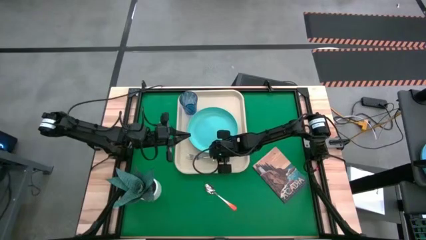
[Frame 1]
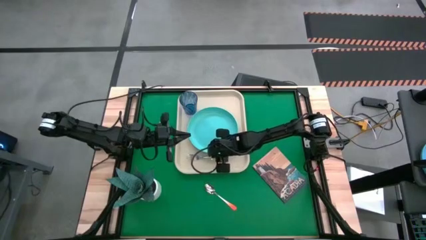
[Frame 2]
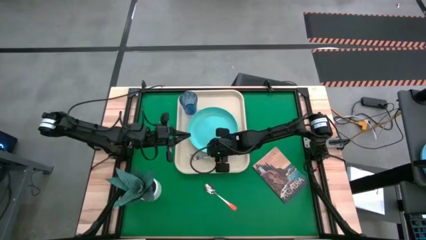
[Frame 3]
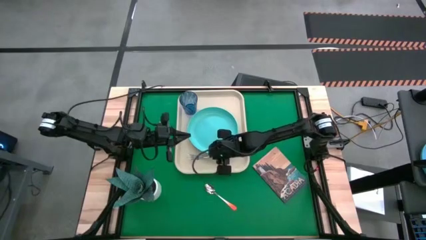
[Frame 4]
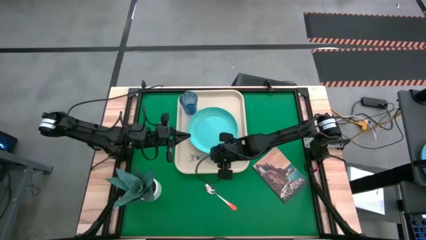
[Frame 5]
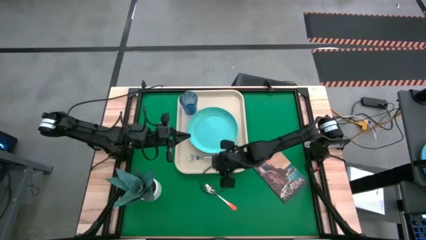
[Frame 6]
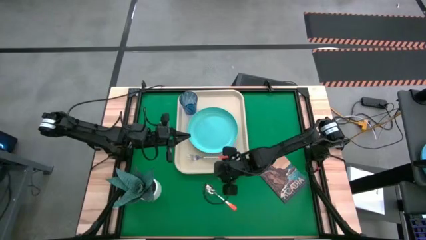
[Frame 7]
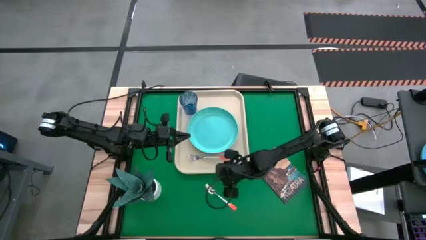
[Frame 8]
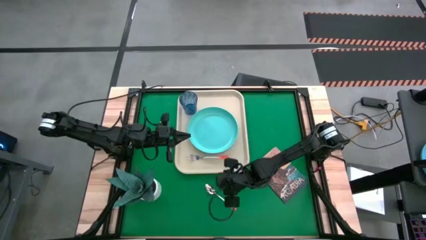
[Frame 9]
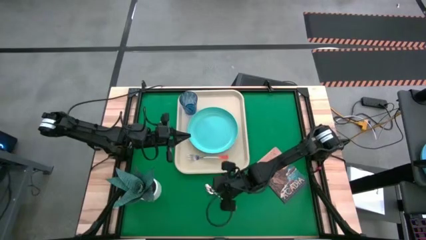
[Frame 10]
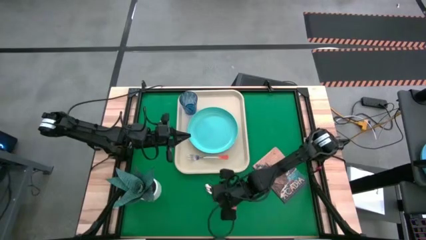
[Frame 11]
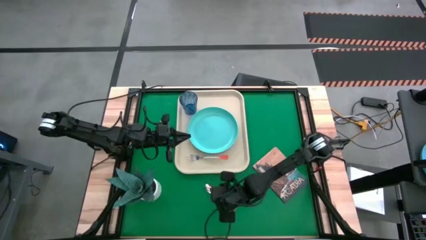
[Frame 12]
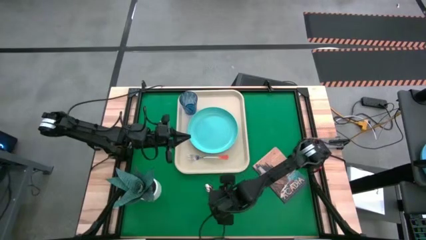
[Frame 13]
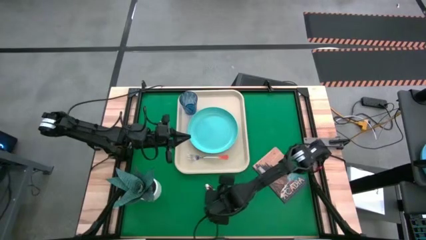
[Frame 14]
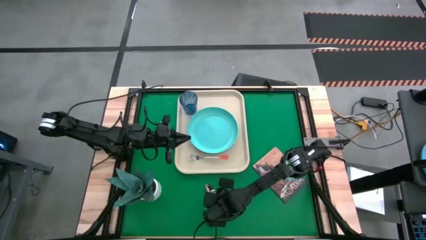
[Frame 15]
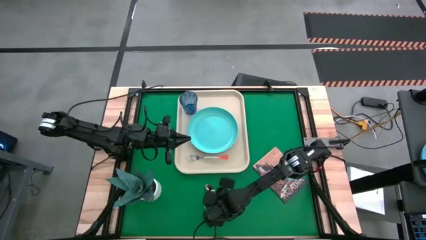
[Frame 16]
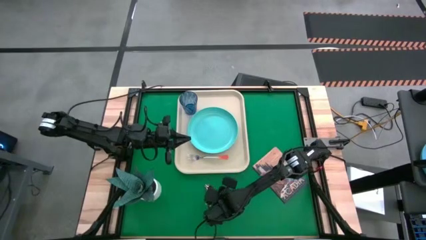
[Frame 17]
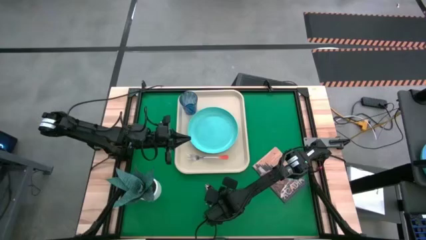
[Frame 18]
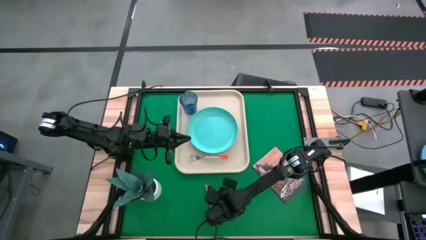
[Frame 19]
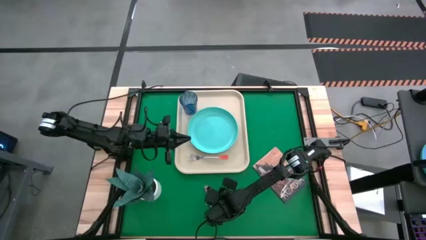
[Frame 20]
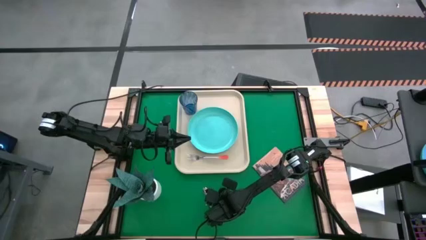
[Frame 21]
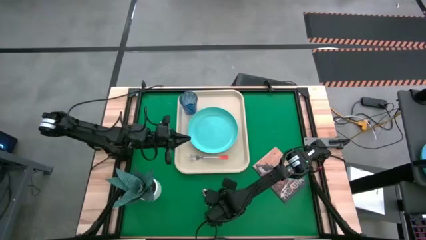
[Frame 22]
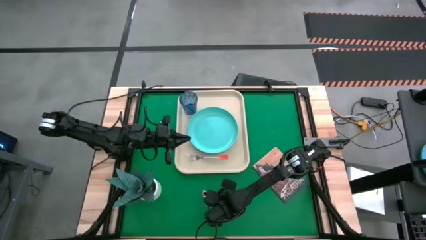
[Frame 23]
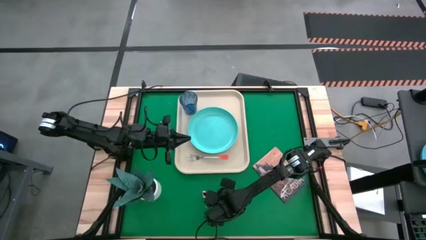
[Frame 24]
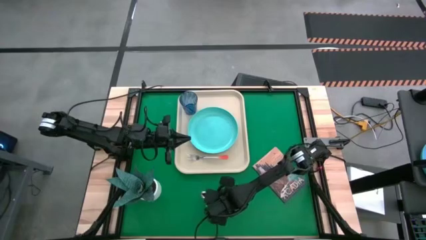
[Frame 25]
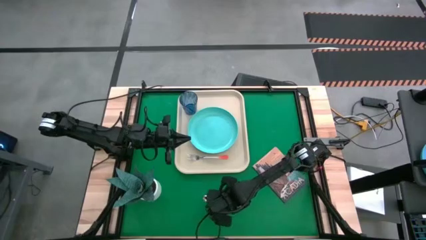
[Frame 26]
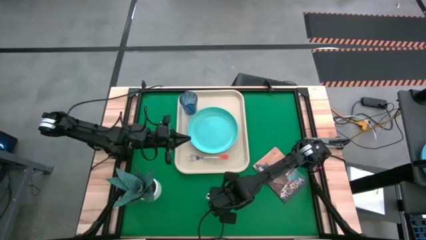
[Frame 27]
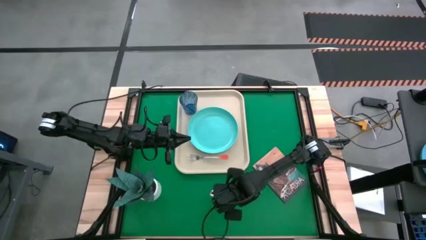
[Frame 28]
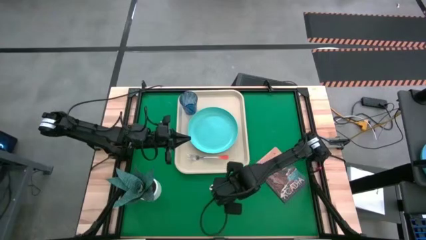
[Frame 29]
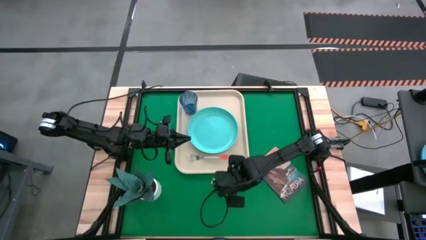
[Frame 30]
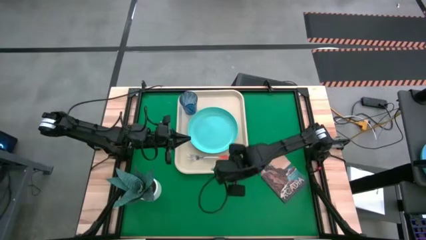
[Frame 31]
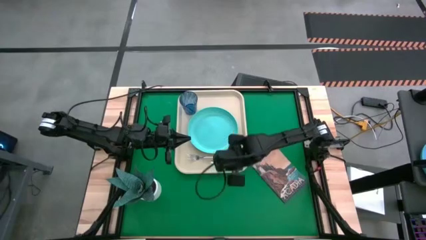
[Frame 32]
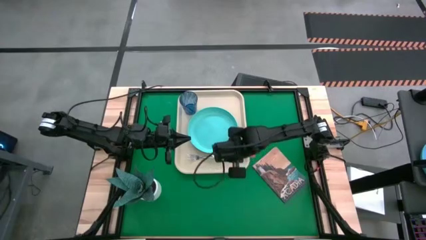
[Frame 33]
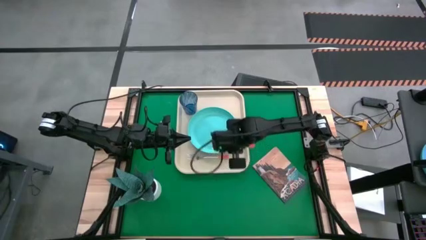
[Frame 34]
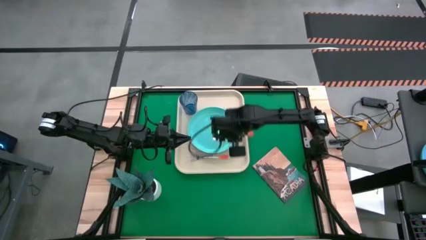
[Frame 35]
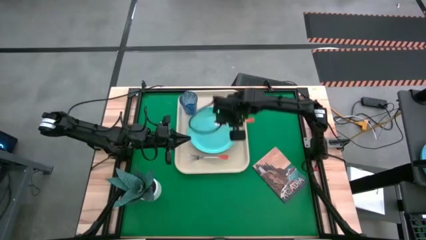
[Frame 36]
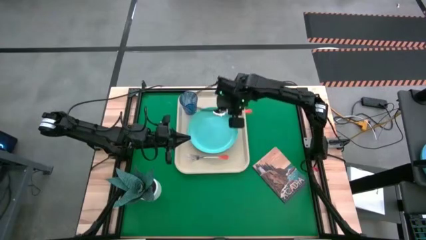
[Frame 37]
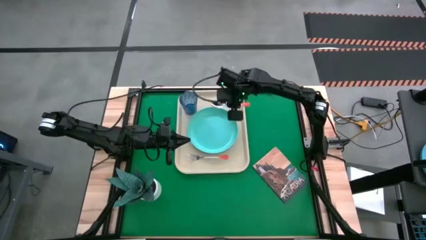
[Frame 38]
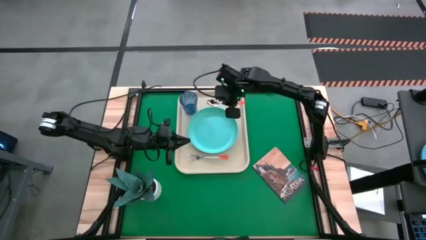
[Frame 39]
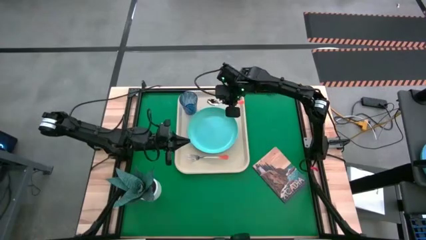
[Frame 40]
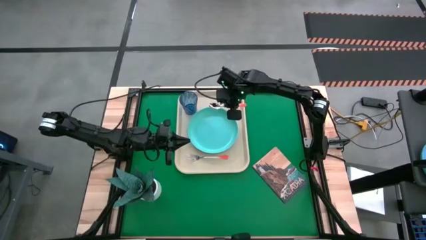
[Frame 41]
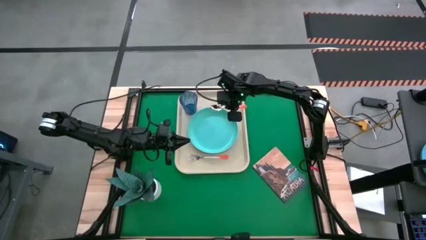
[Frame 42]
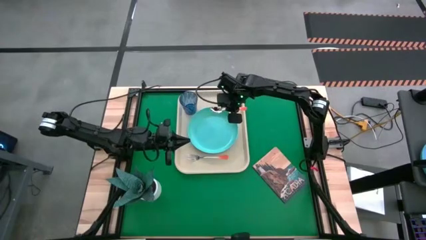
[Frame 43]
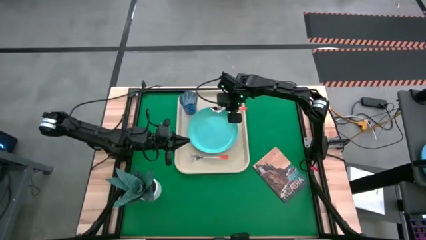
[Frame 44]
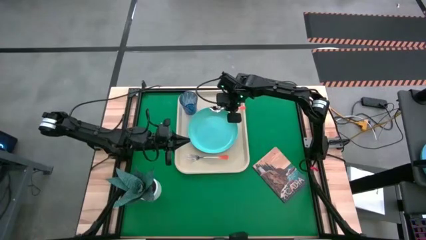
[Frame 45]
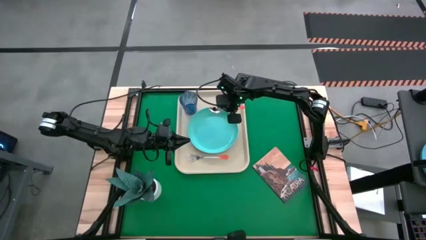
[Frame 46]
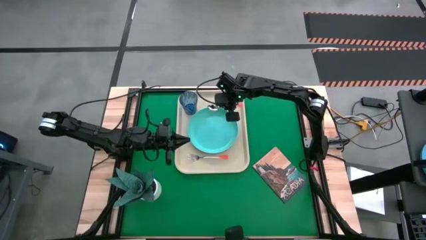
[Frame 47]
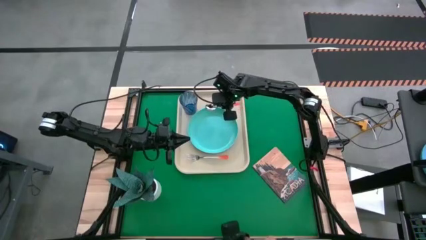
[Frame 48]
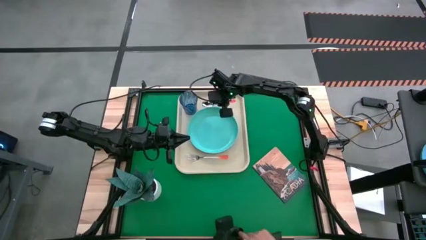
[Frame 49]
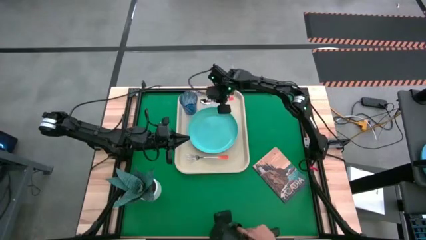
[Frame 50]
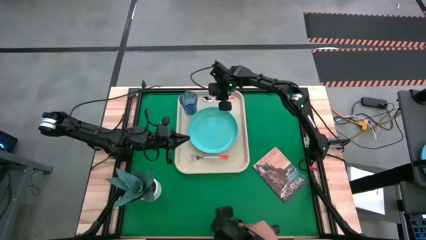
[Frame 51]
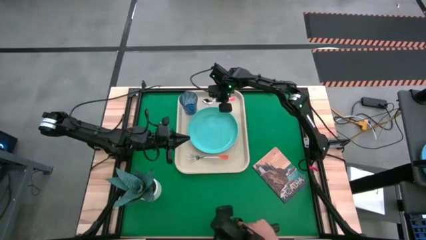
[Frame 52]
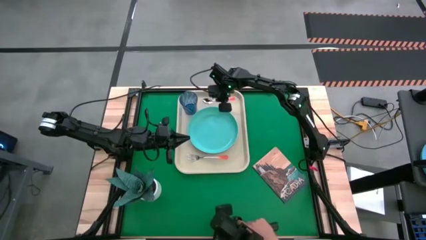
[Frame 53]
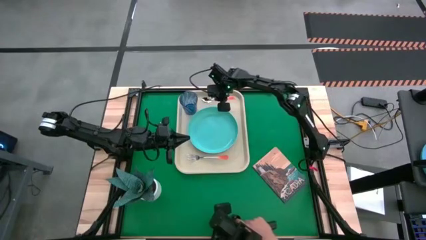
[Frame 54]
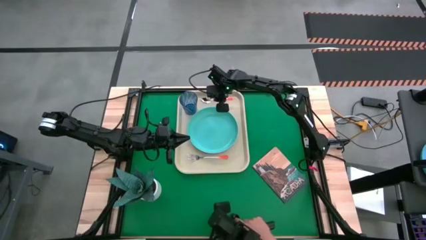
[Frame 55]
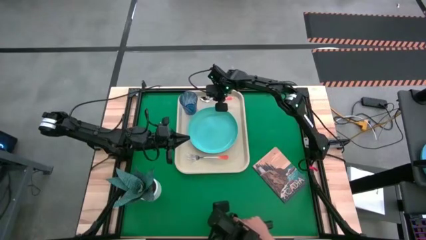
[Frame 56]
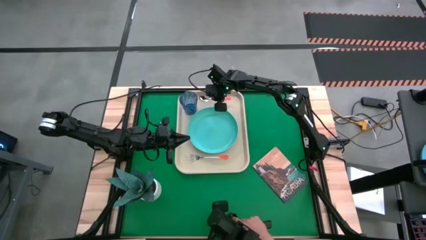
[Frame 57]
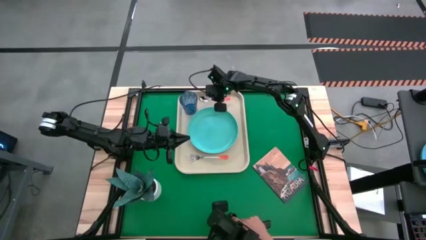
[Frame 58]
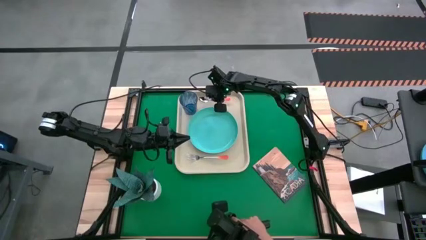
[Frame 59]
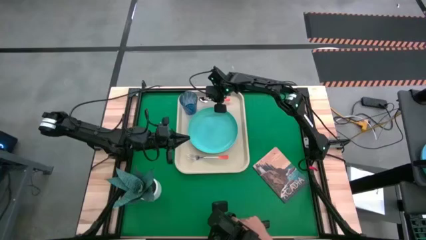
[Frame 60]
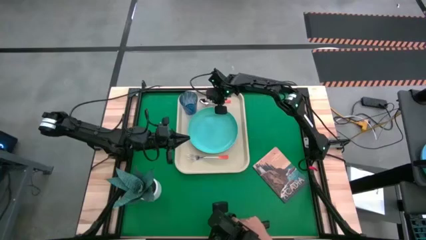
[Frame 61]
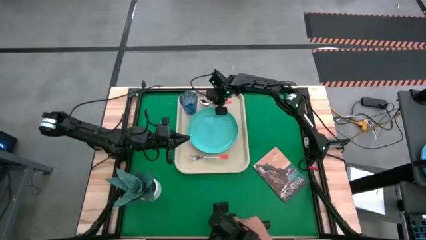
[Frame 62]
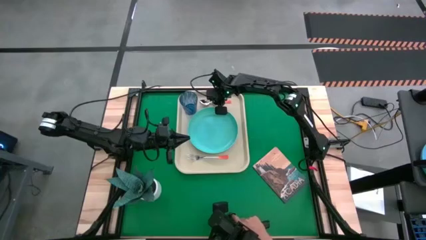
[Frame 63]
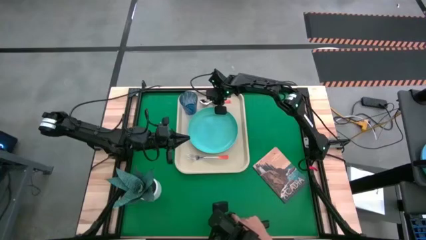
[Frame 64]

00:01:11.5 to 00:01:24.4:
Task: Pick and place plate/cup/fork/spoon on tray
Put the orange spoon on the serving tray to the right of the blue plate
